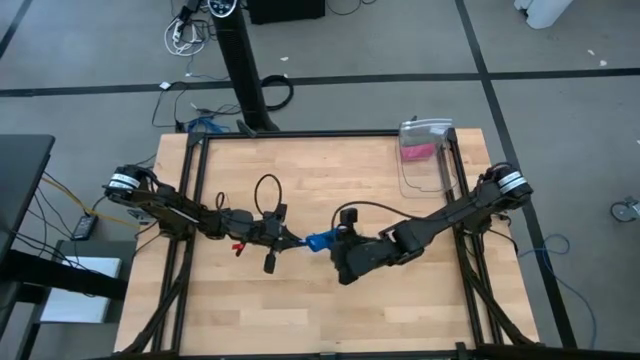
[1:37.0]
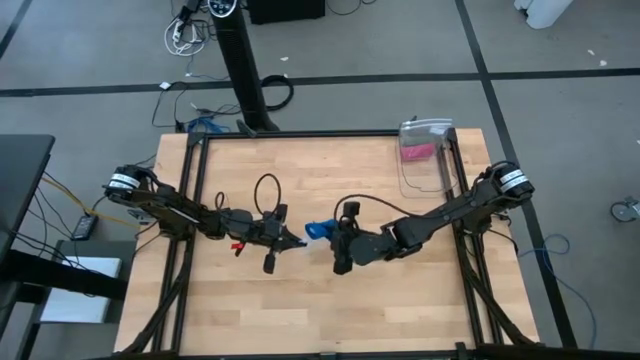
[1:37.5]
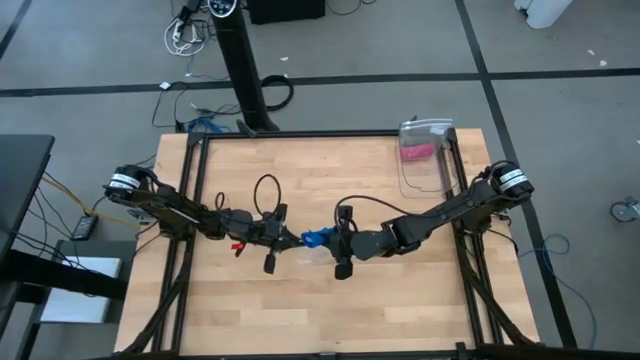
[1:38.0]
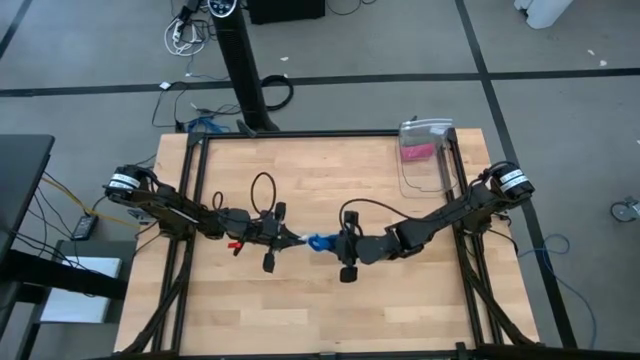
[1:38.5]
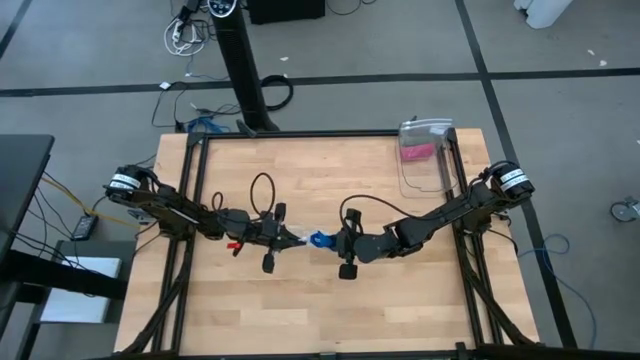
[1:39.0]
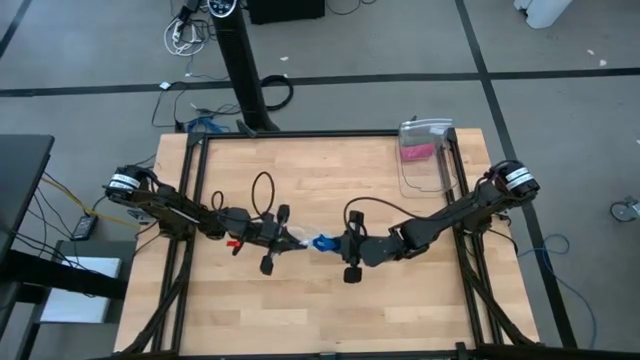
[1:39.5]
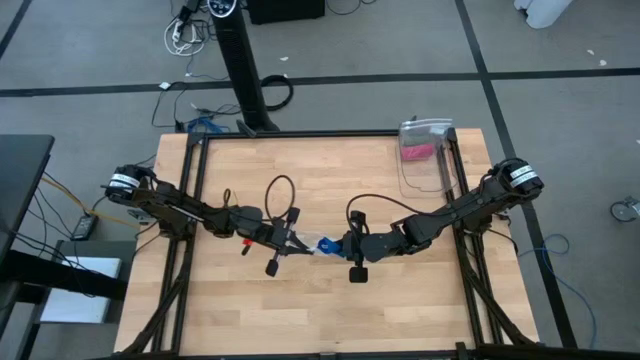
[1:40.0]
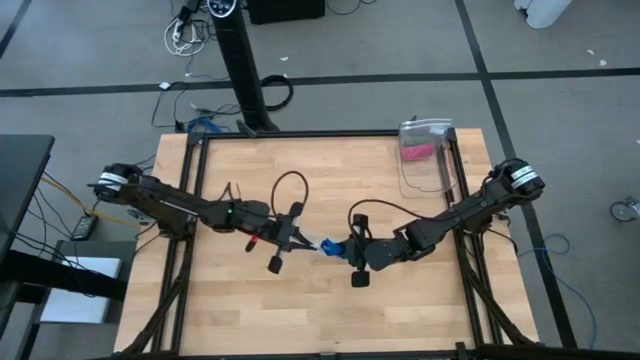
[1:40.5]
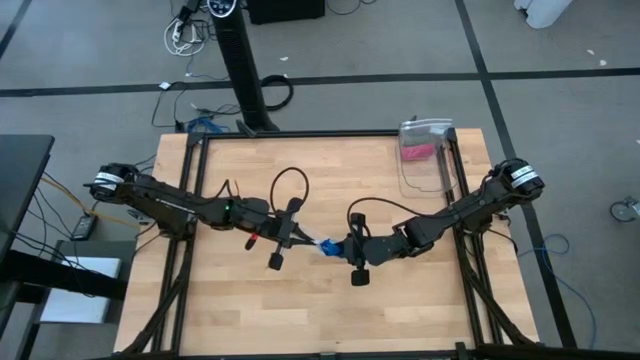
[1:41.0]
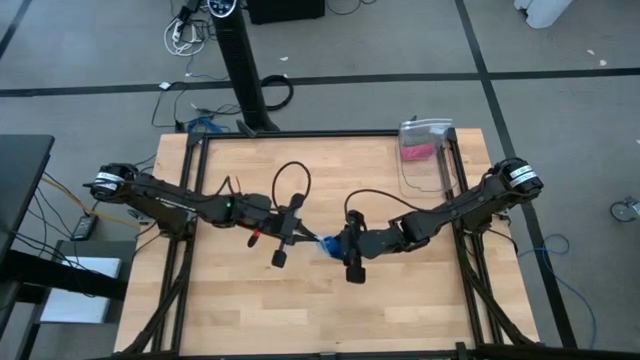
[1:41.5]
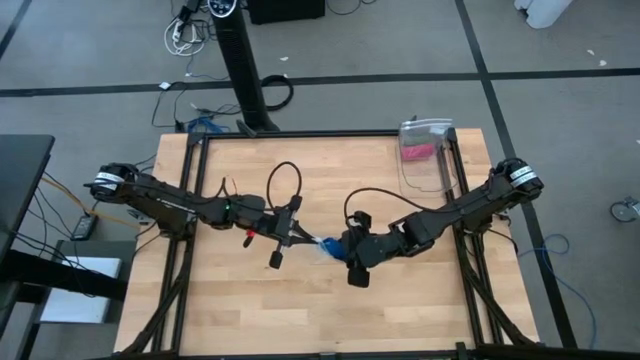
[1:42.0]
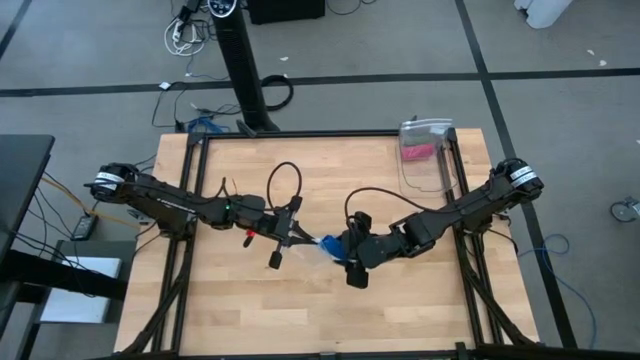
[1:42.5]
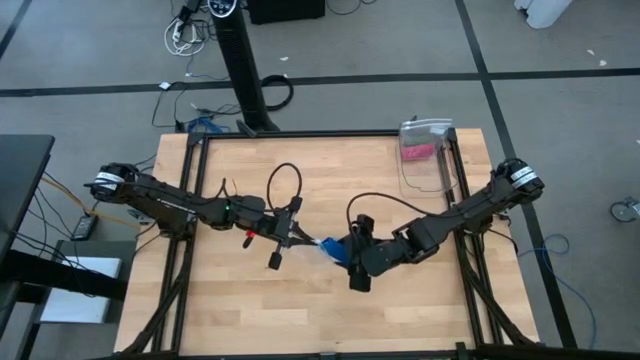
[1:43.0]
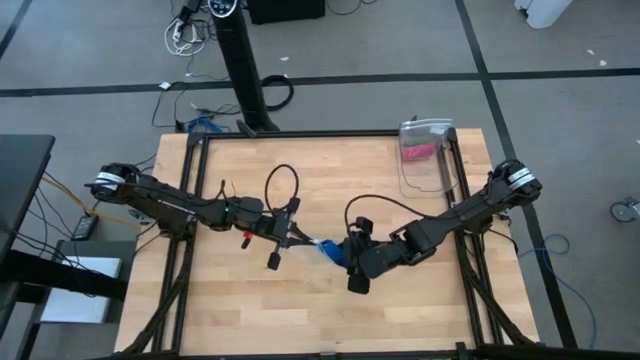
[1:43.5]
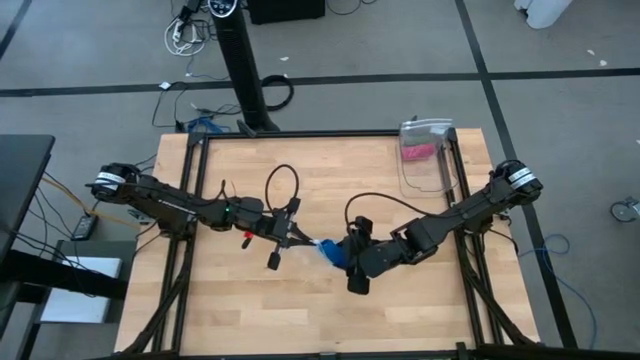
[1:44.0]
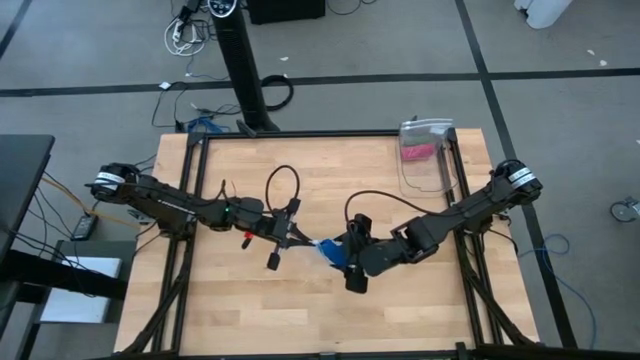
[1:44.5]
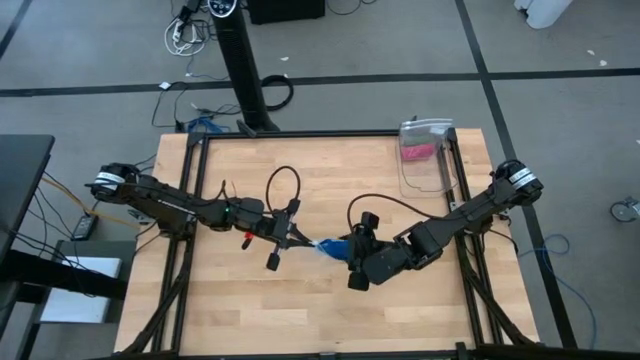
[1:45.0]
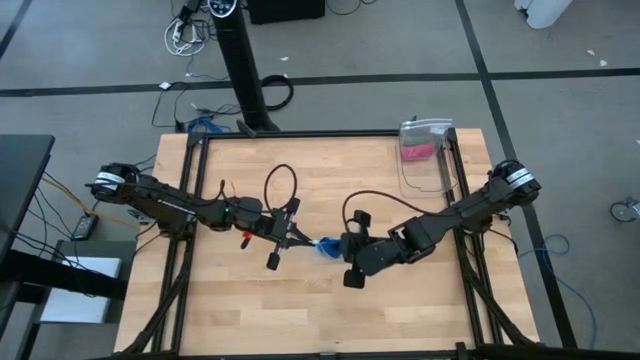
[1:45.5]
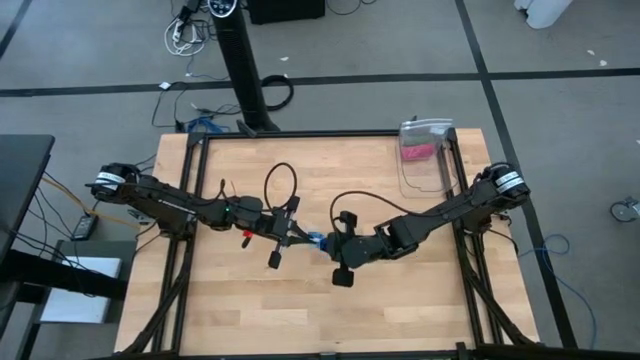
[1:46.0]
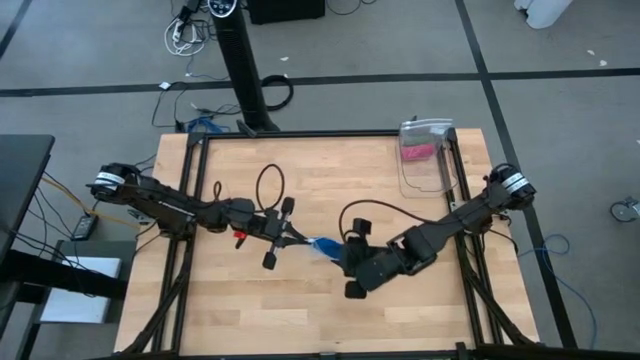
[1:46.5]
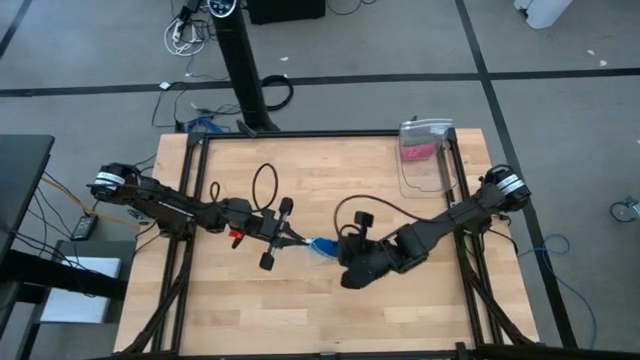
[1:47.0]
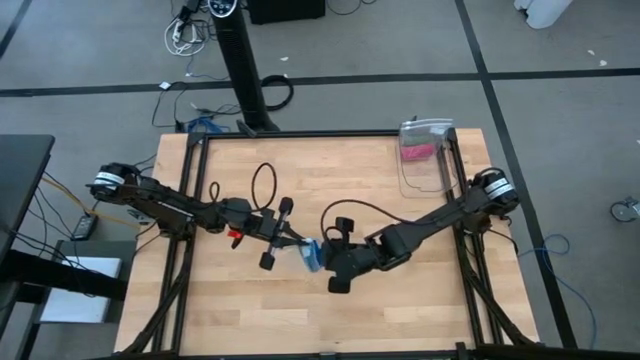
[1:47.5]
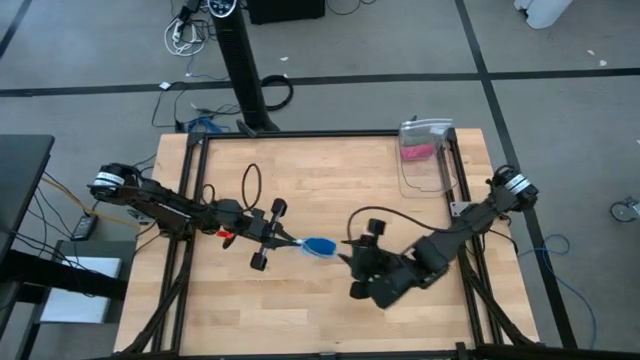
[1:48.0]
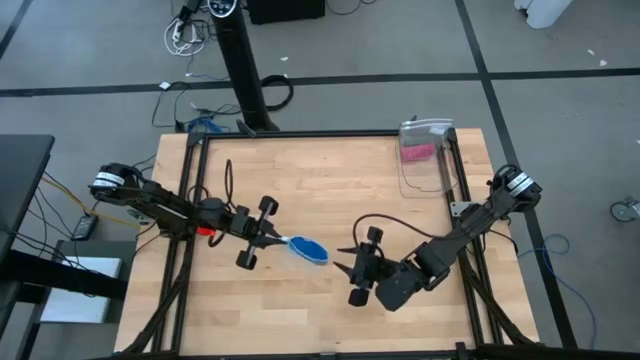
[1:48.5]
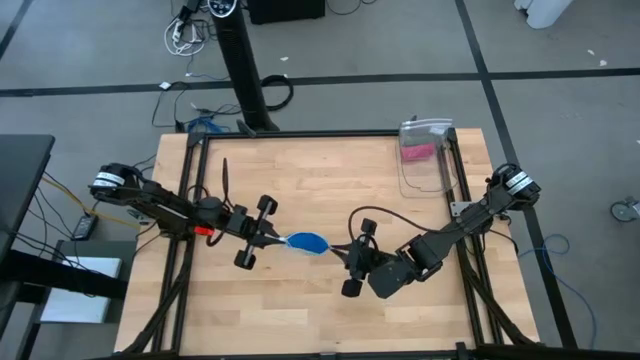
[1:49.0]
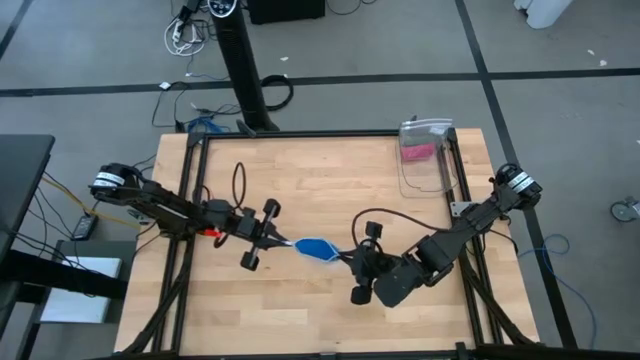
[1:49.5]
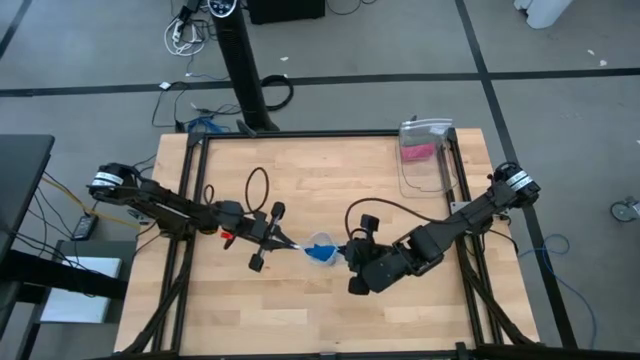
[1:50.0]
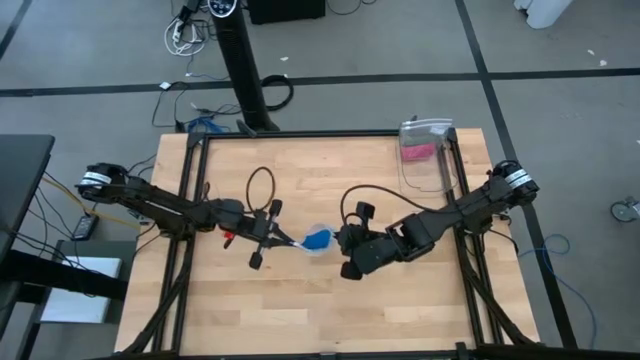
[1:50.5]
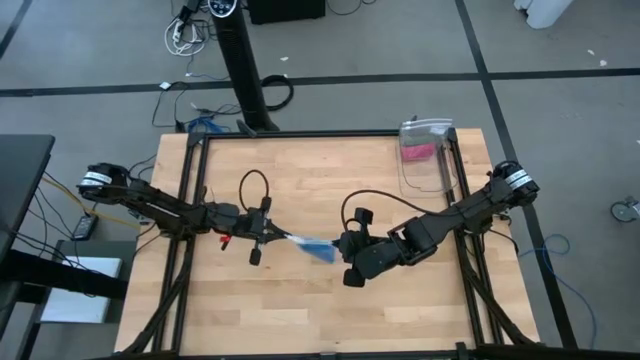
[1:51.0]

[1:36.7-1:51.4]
Task: Roll bandage
Put the blue rolled bandage into the transparent zip bag

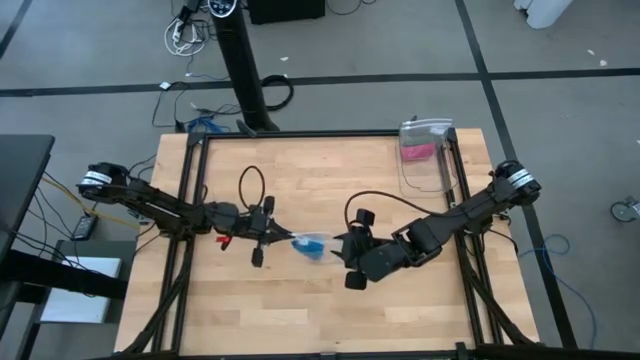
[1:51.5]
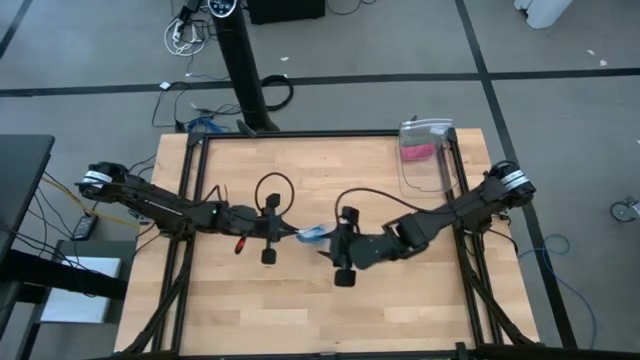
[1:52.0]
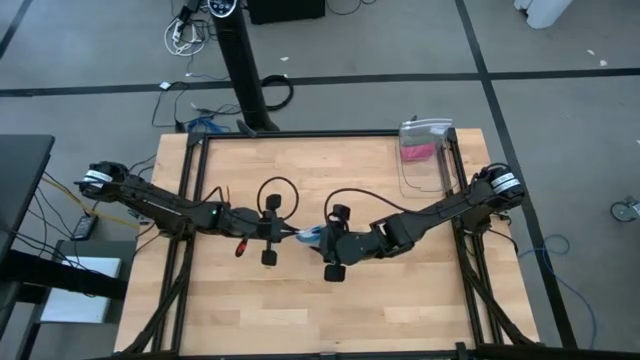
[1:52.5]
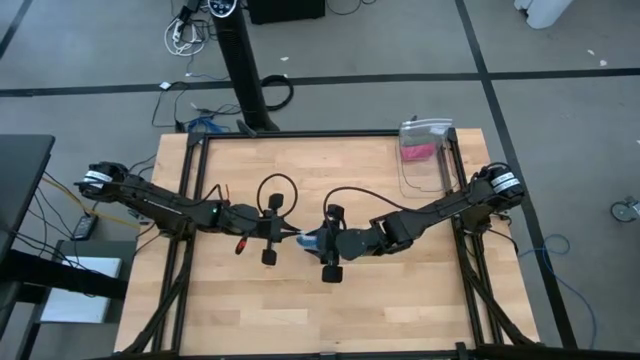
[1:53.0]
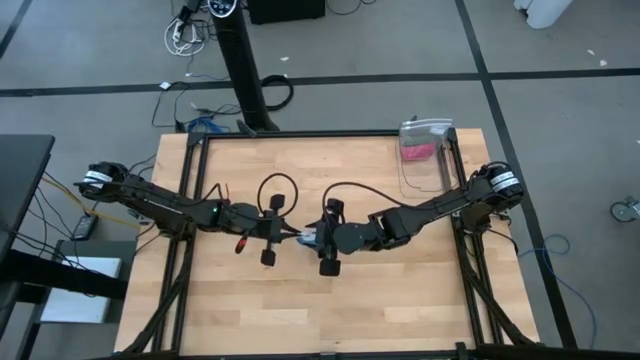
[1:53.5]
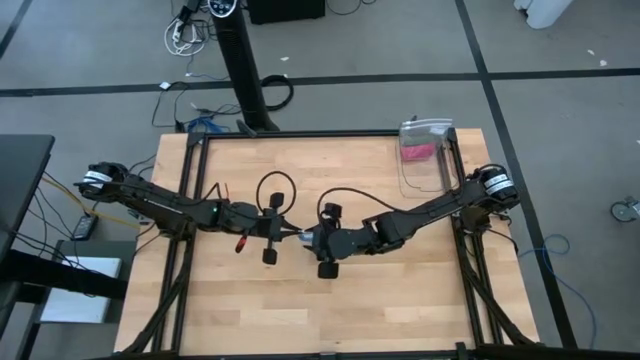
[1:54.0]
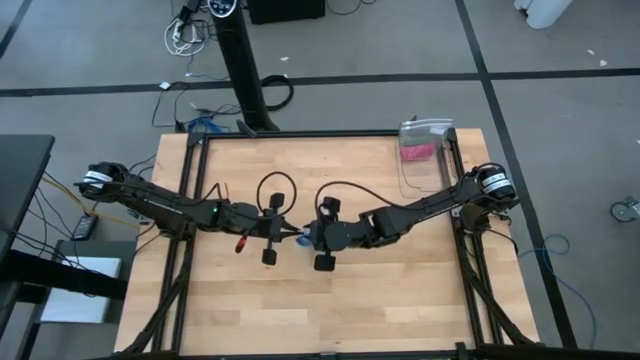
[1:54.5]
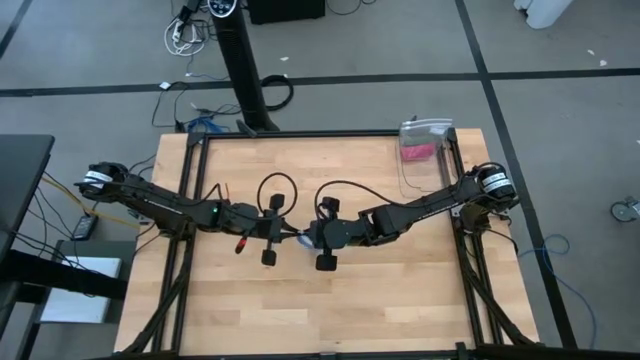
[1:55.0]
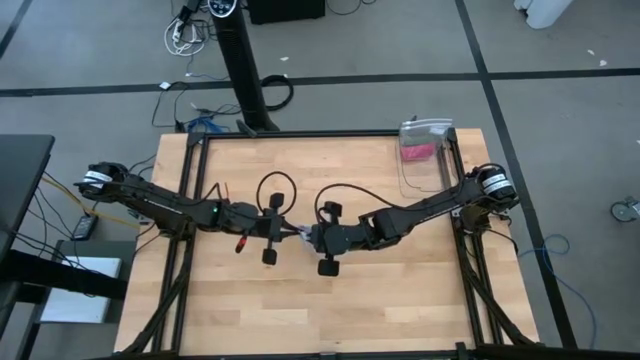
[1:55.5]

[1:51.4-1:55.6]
Close the transparent zip bag

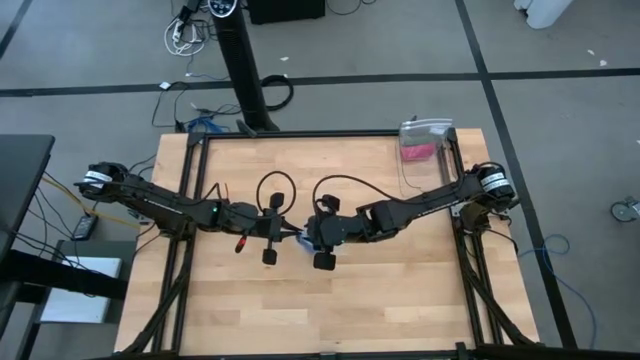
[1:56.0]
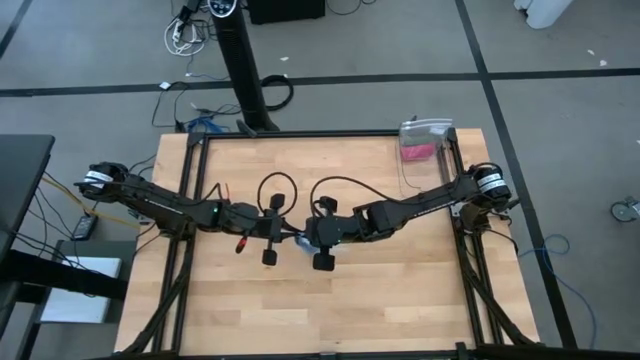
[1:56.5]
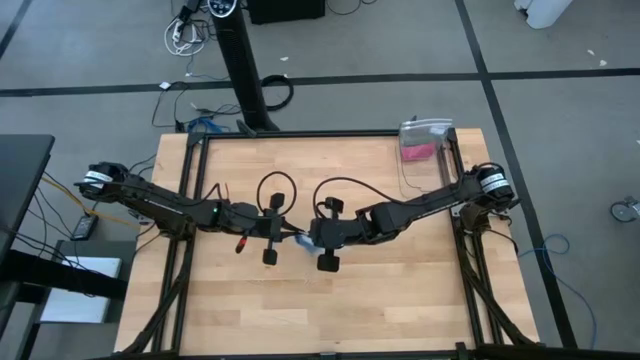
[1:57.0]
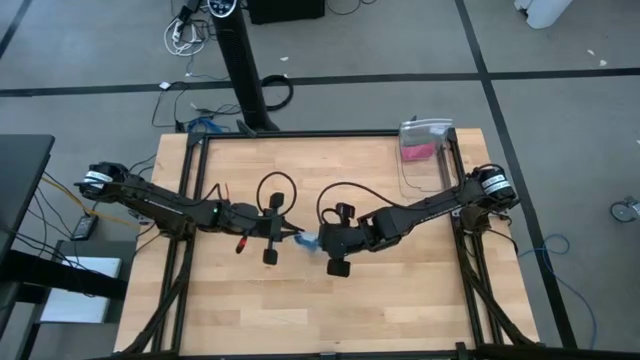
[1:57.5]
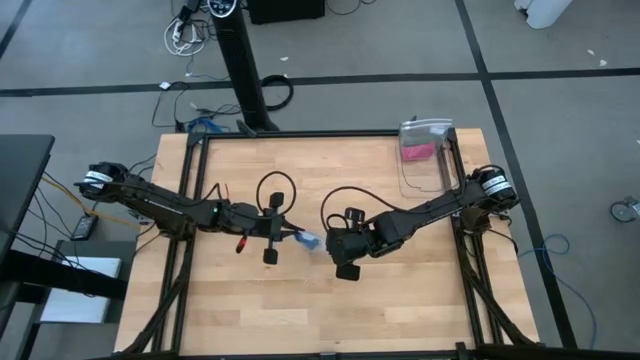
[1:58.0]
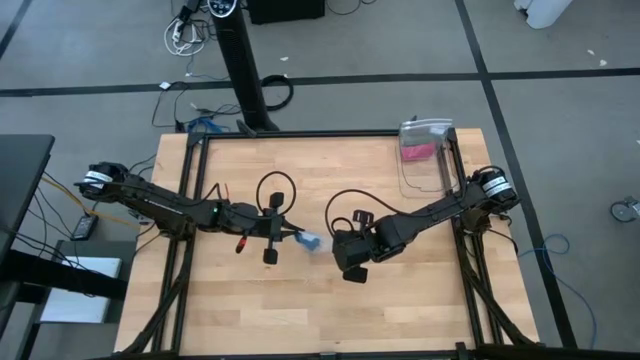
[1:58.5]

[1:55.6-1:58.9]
Close the transparent zip bag

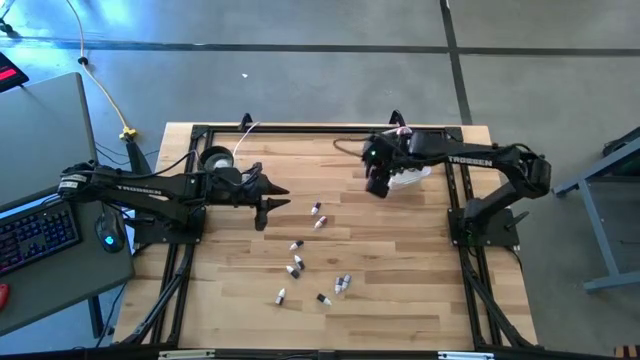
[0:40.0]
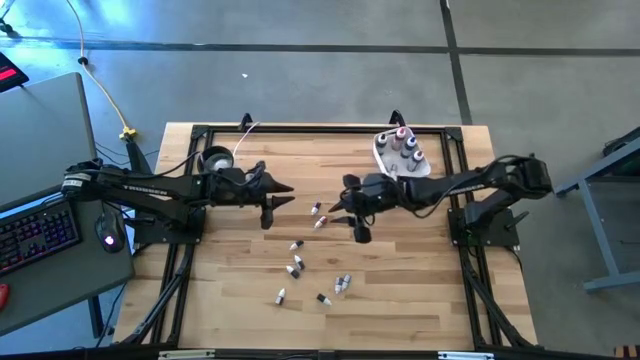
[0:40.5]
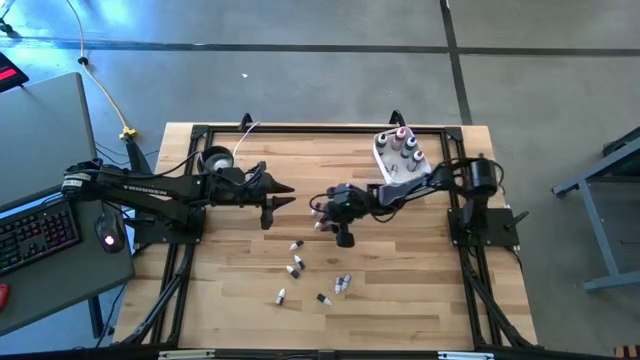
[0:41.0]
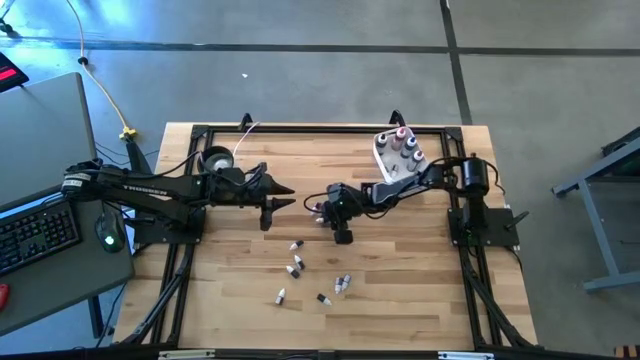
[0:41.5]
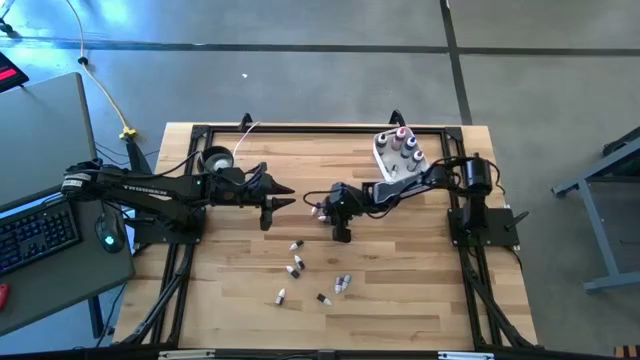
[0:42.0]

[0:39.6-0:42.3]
Task: Pick & Place food coloring
Put the bottom small red food coloring bottle into the white bin
